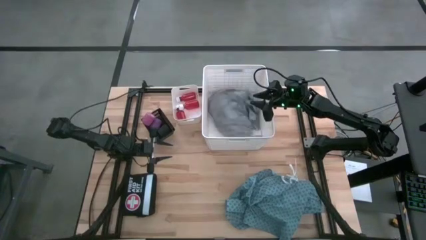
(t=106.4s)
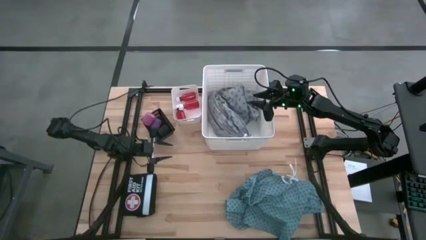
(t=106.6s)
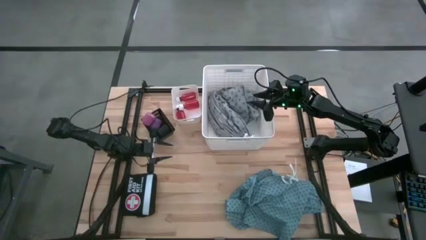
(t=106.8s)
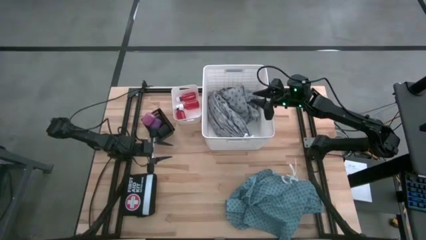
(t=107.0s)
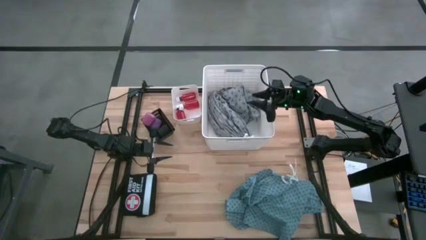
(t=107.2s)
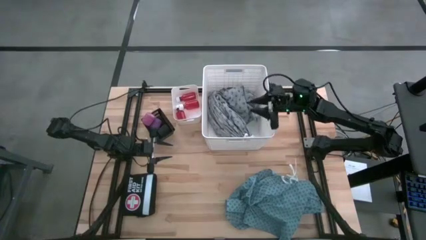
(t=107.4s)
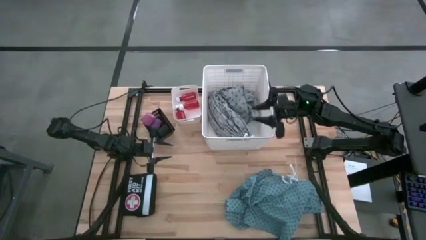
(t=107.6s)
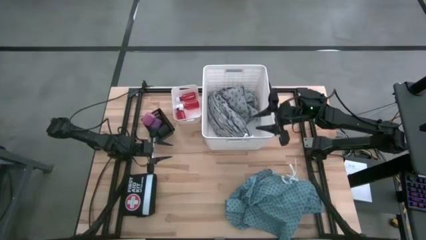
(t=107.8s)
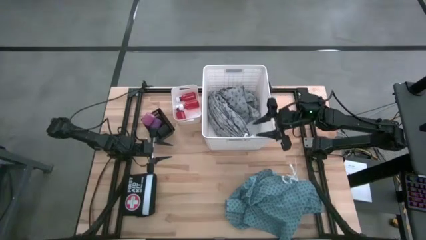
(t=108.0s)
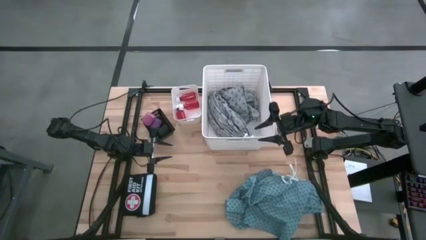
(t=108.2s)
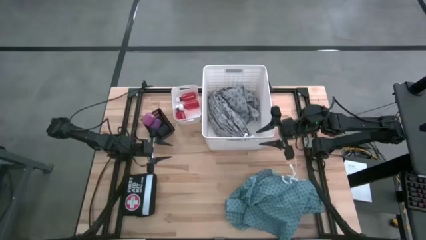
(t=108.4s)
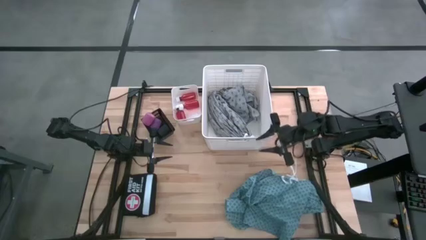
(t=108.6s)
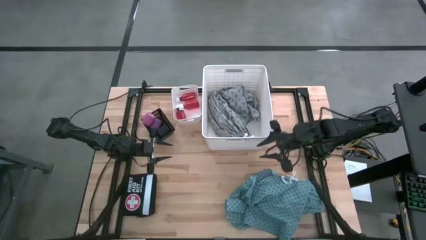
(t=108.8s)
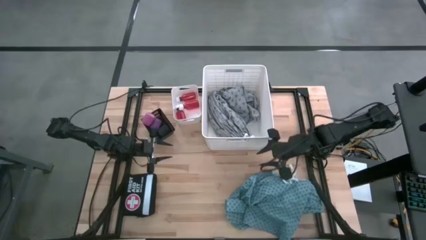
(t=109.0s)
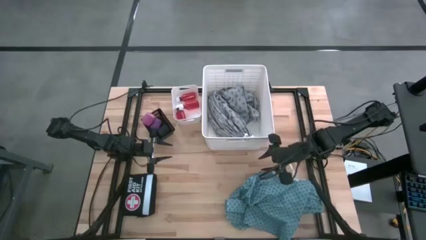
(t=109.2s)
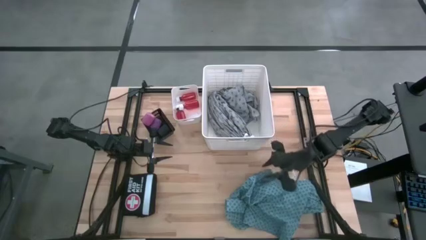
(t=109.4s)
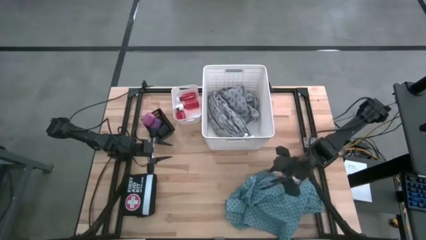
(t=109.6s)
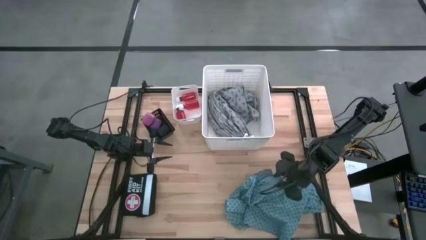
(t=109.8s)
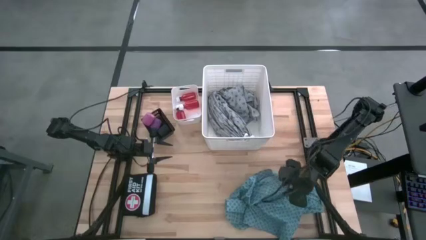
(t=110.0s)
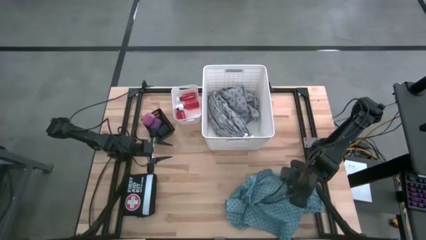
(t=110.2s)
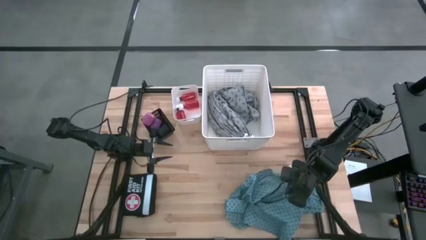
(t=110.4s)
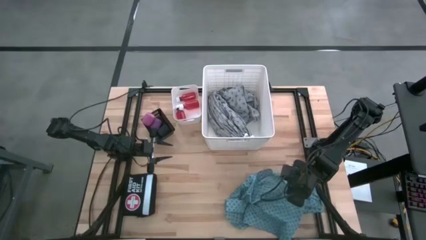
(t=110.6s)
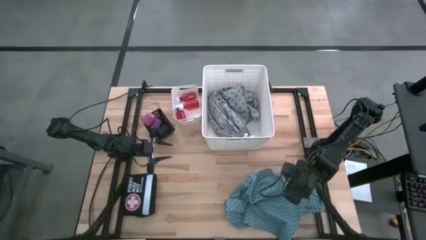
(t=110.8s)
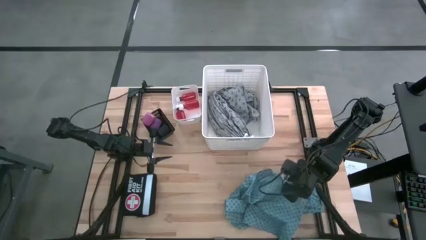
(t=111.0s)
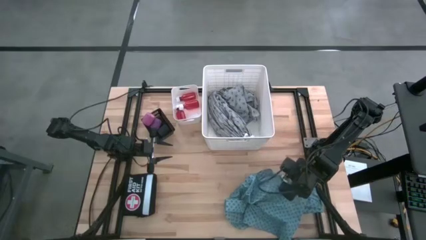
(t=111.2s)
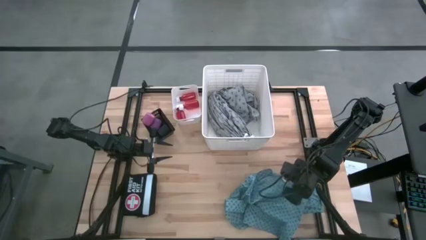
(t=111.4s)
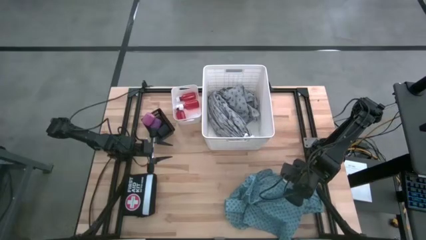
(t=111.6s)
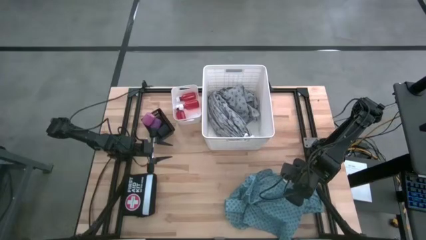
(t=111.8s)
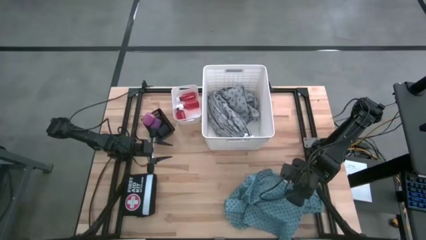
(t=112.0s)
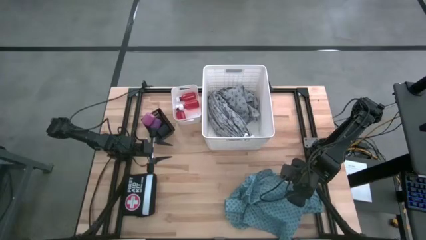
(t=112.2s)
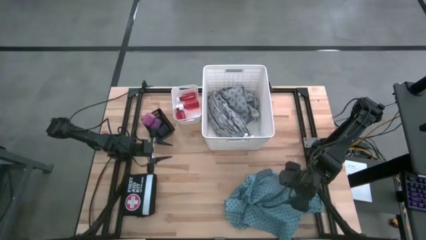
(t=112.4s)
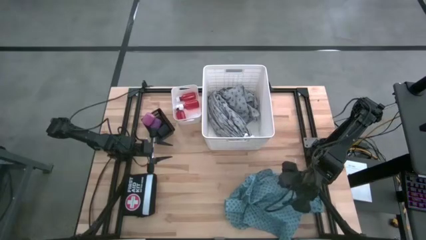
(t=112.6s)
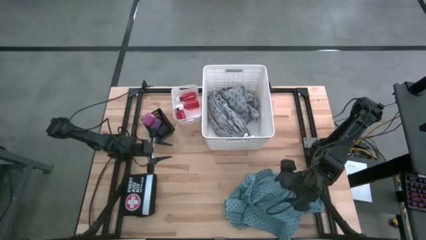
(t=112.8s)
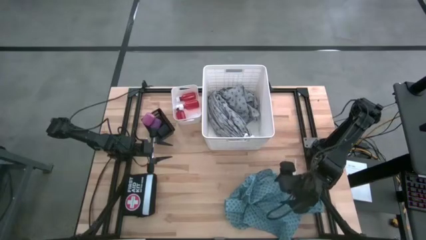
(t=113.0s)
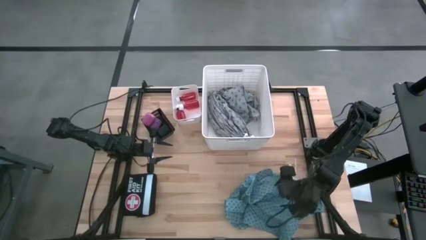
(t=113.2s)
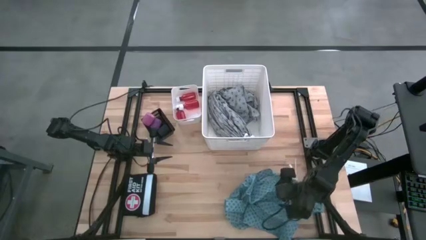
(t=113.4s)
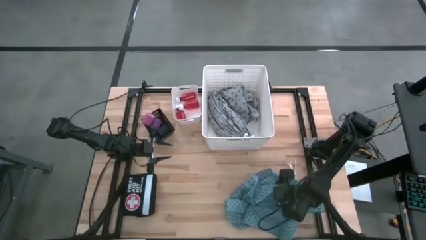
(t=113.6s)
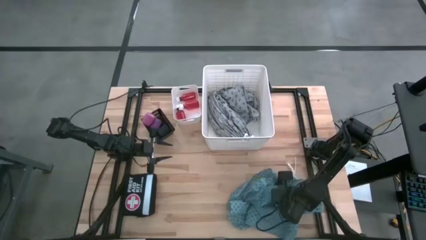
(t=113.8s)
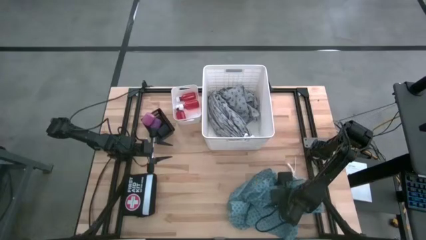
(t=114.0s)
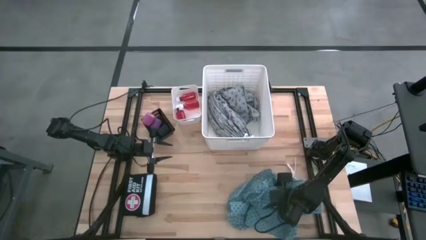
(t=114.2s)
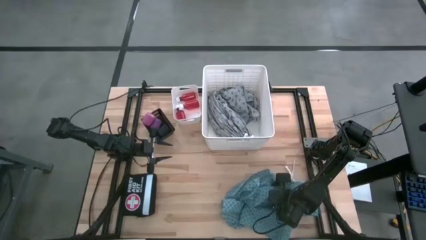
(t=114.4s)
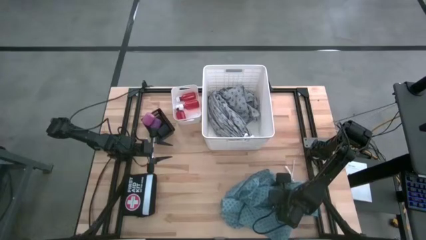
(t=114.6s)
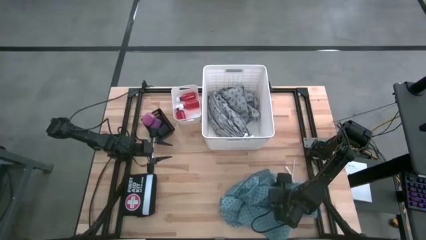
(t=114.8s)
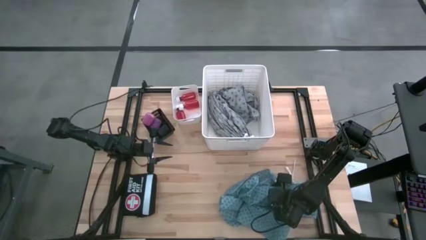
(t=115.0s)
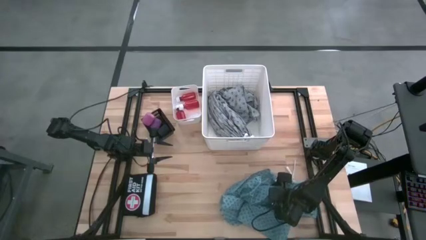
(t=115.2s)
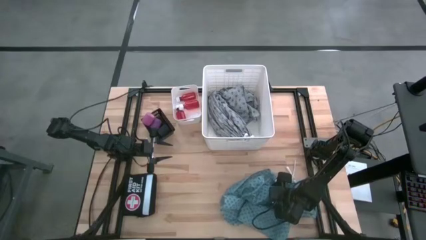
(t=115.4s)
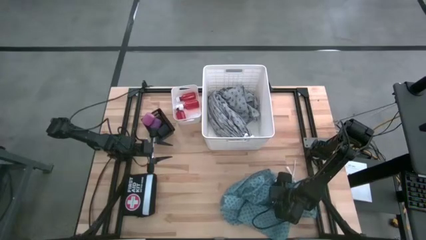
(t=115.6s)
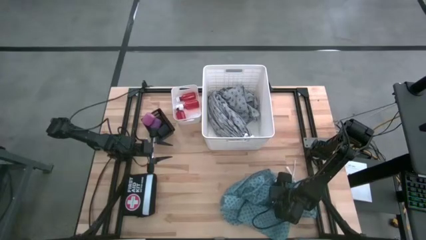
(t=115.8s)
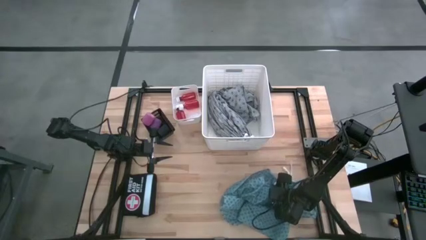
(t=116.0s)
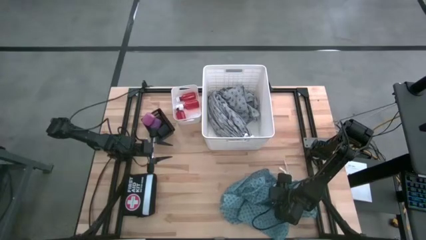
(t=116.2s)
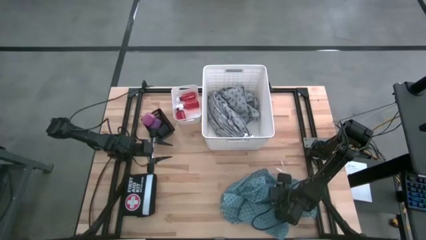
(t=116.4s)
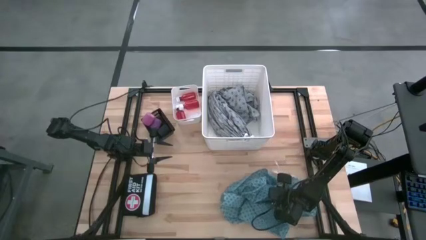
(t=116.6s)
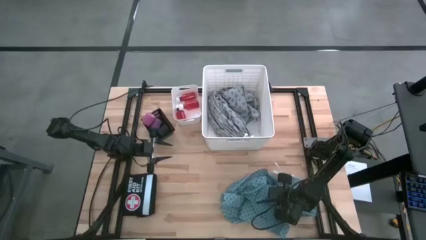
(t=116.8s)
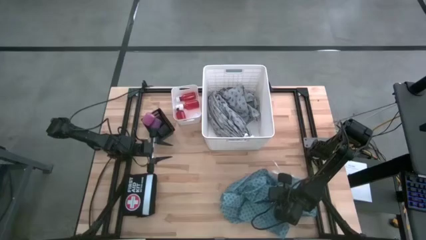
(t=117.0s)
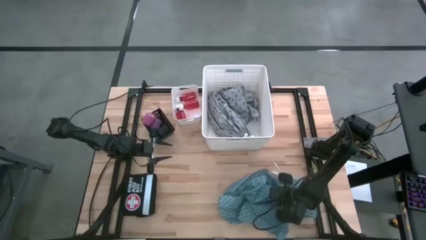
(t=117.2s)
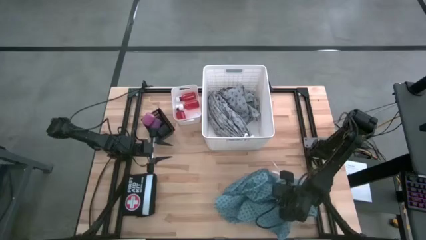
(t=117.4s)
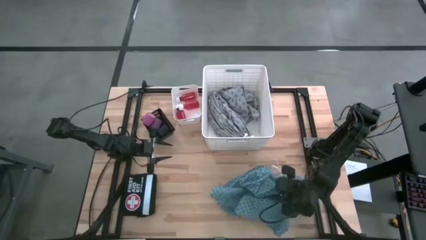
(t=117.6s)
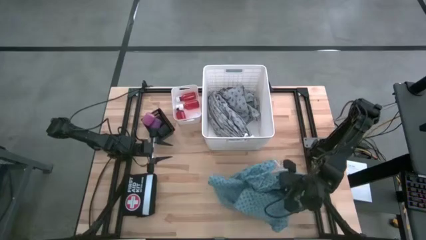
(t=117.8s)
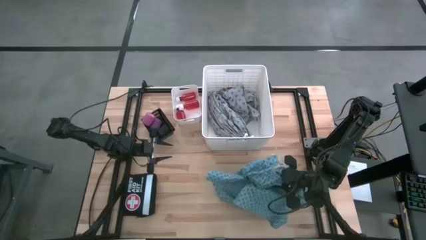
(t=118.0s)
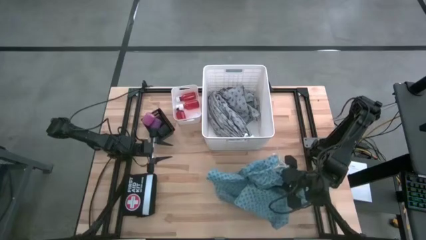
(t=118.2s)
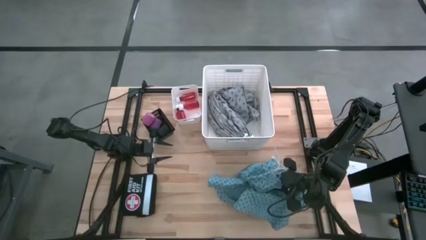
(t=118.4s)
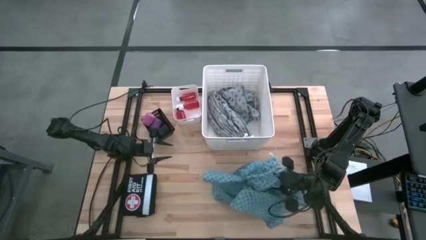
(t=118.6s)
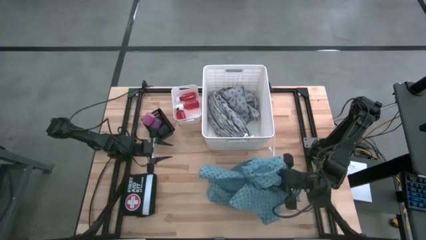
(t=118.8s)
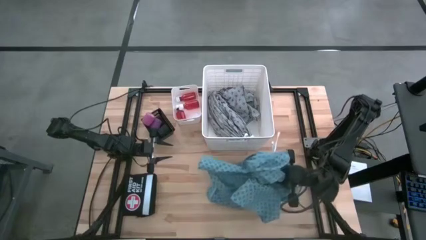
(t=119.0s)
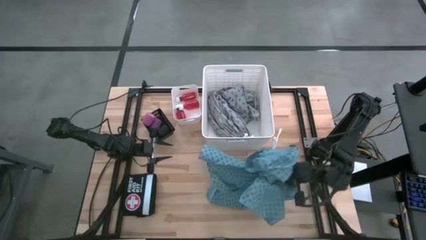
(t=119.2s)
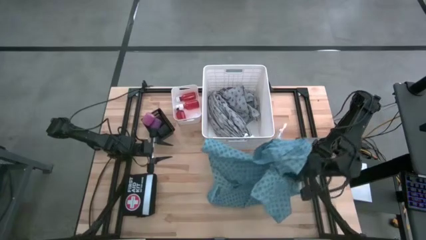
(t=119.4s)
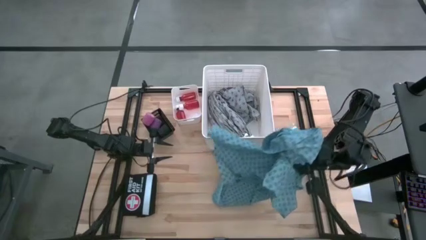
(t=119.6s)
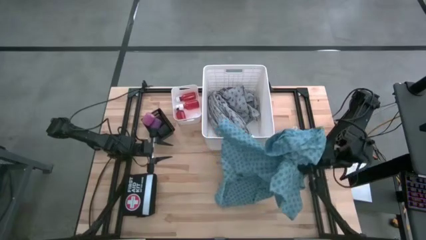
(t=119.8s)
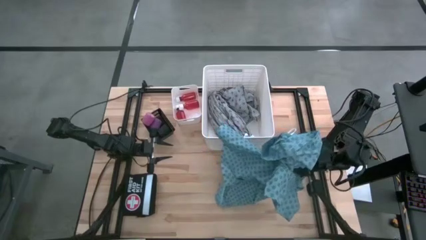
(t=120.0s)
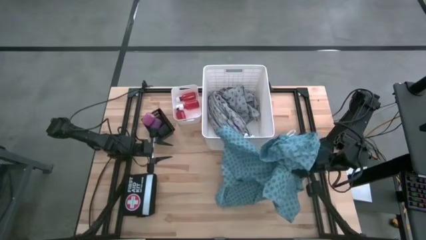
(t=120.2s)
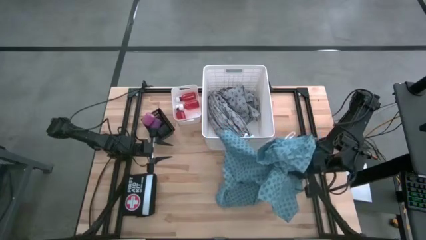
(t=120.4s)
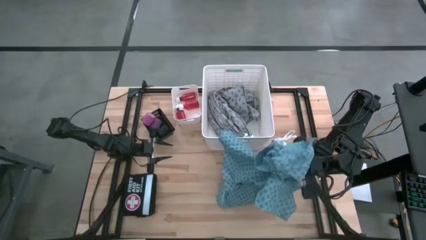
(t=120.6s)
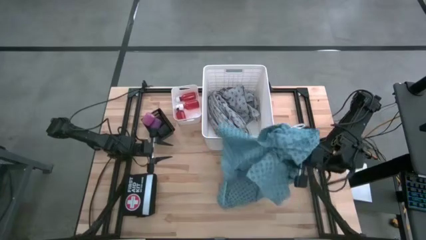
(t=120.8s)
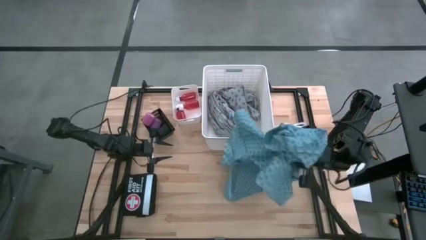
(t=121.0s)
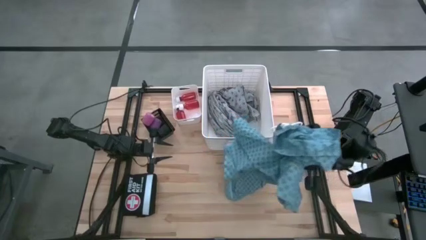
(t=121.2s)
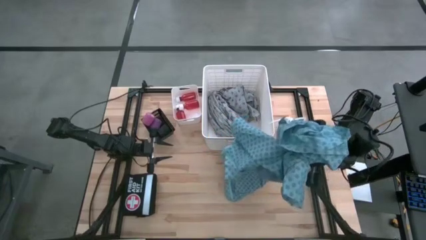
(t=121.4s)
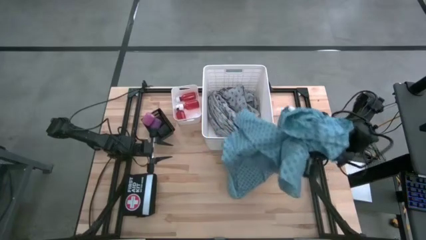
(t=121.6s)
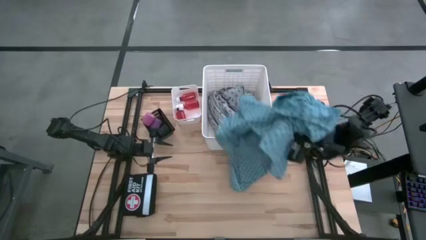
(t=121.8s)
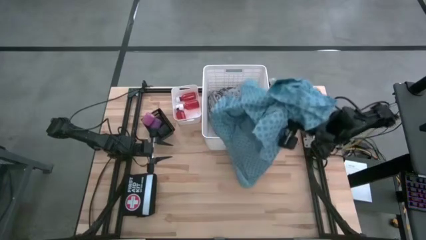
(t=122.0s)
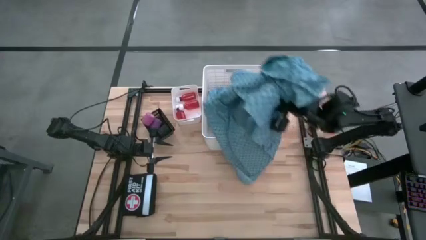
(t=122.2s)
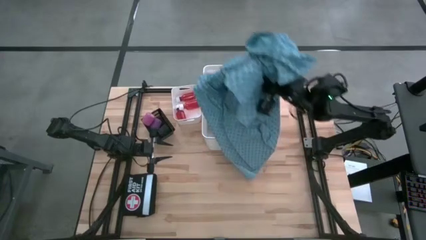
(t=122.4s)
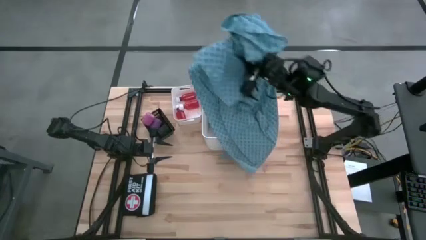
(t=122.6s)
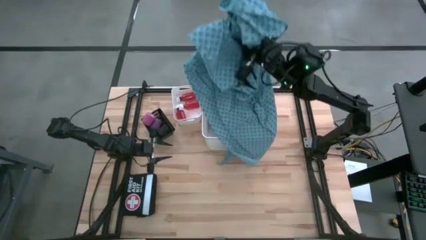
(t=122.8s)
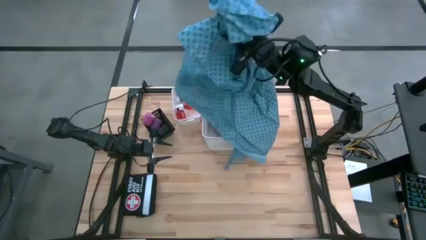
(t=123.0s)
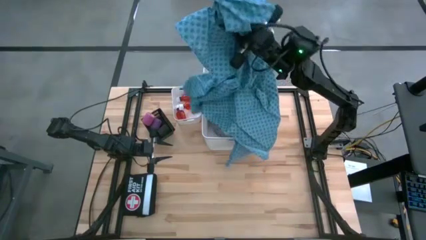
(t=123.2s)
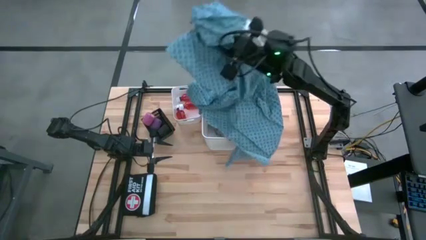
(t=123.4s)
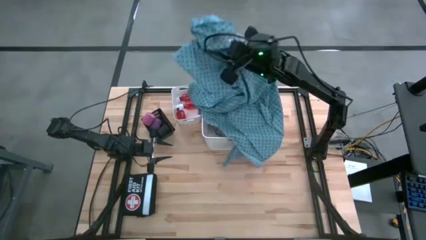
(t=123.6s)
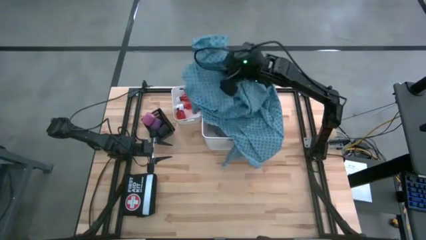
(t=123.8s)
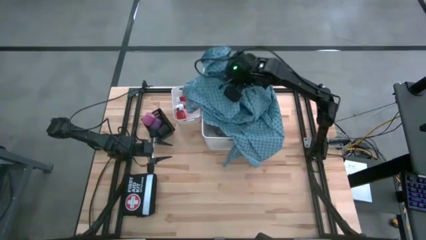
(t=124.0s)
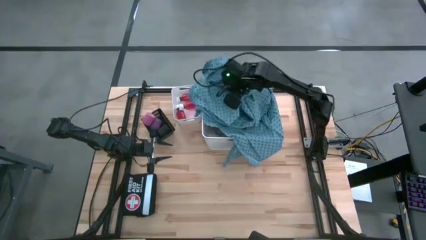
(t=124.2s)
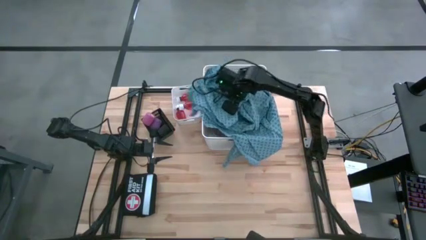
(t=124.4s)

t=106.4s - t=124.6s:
Task: Pick & Place Medicine items
Put the blue patient gown into the white laundry bin
